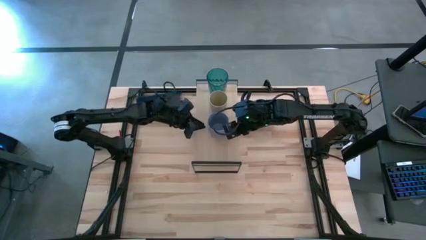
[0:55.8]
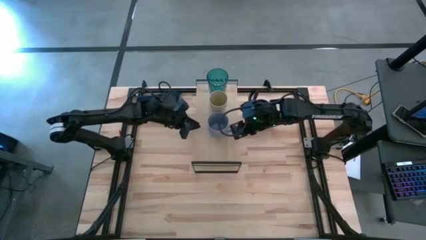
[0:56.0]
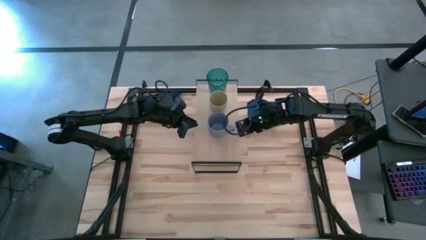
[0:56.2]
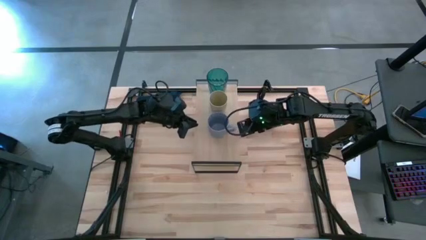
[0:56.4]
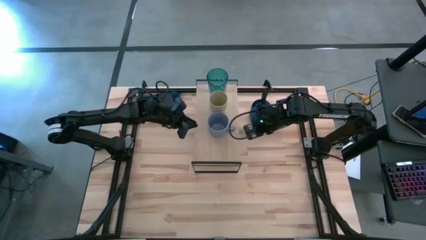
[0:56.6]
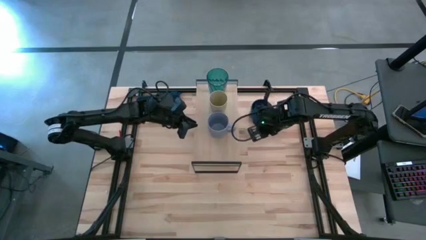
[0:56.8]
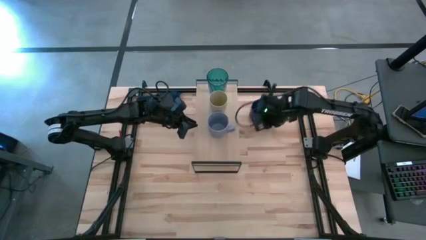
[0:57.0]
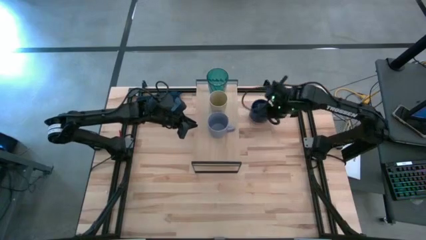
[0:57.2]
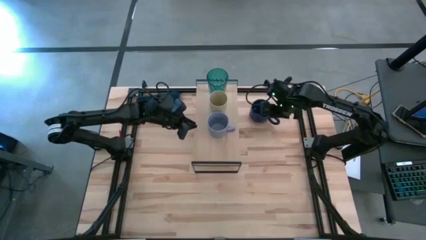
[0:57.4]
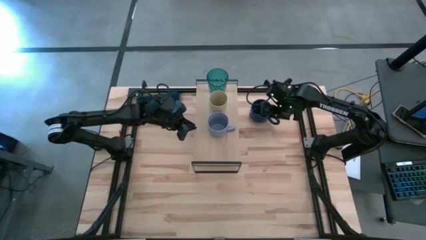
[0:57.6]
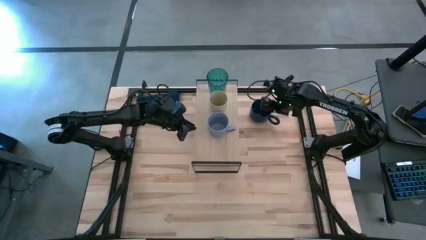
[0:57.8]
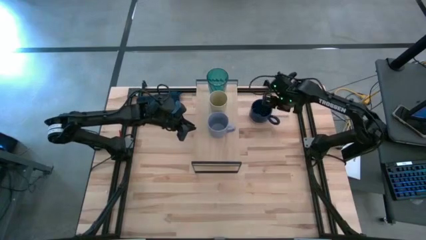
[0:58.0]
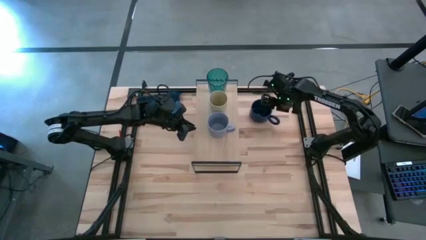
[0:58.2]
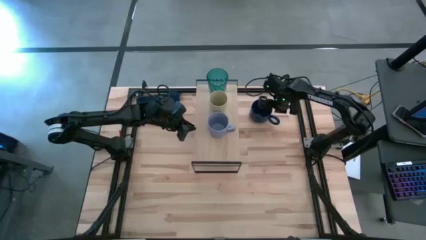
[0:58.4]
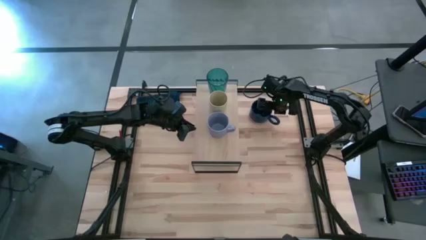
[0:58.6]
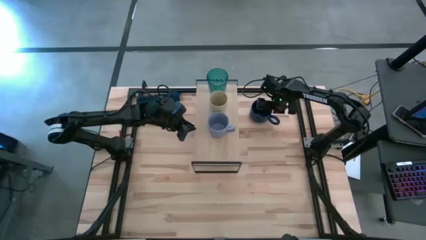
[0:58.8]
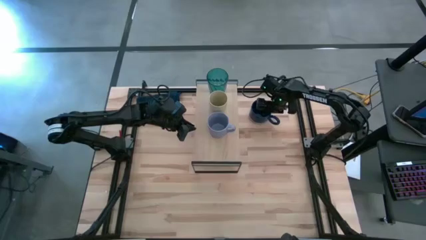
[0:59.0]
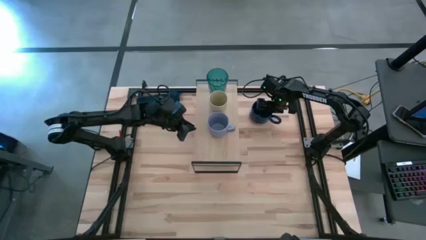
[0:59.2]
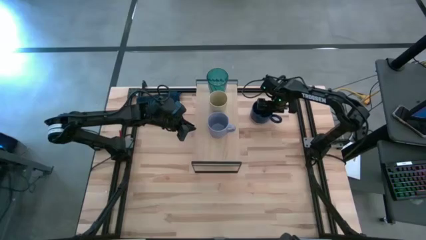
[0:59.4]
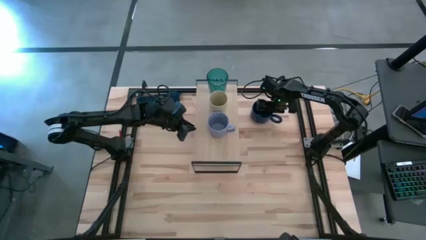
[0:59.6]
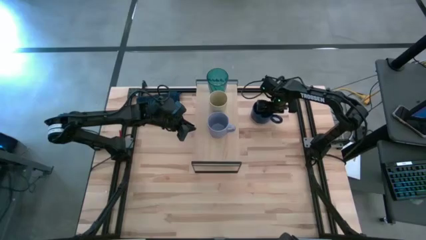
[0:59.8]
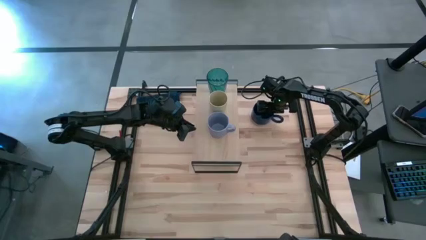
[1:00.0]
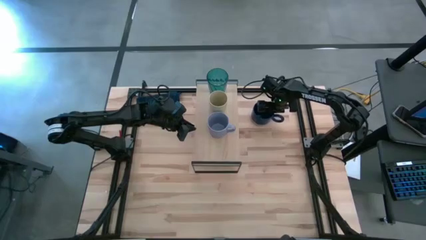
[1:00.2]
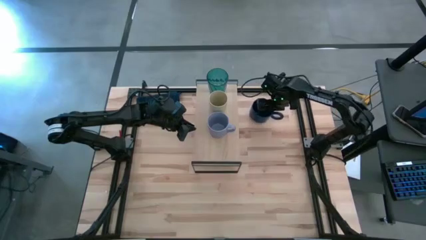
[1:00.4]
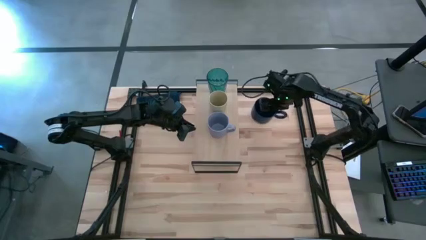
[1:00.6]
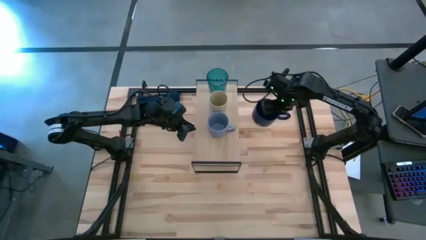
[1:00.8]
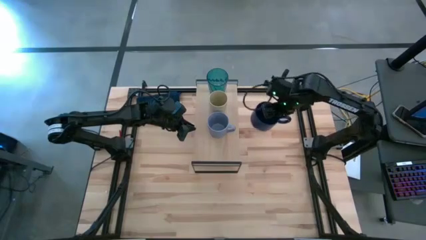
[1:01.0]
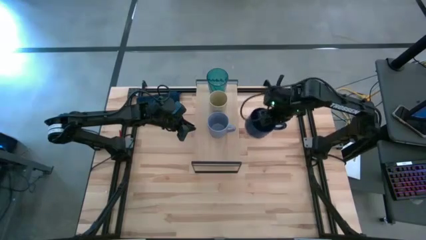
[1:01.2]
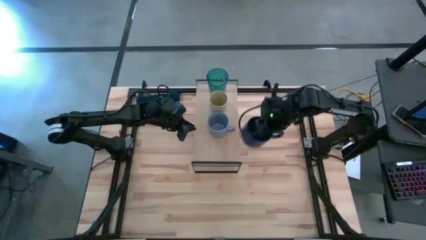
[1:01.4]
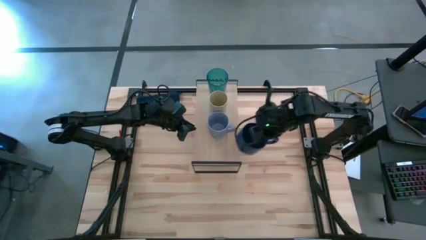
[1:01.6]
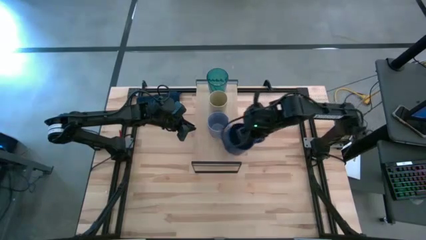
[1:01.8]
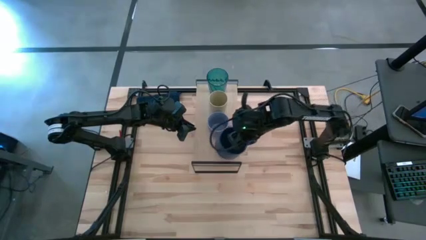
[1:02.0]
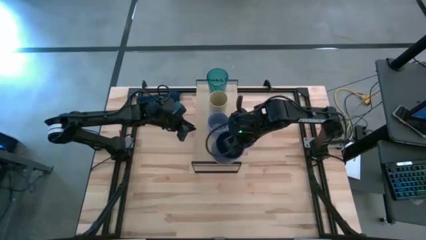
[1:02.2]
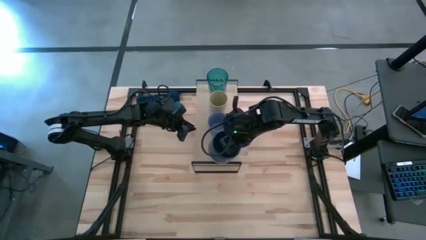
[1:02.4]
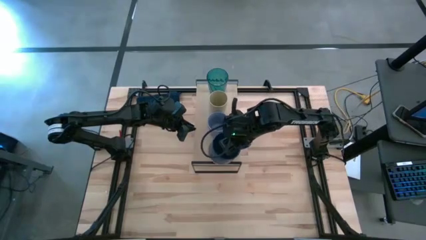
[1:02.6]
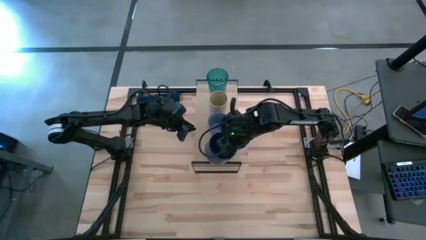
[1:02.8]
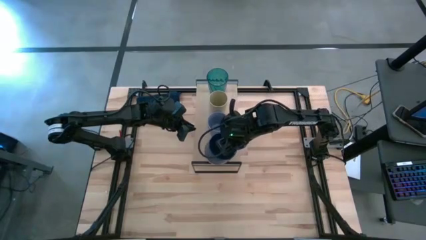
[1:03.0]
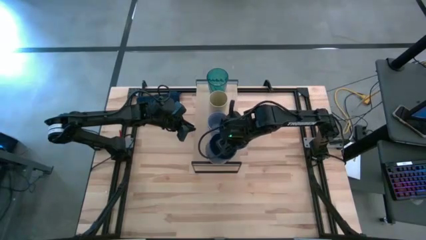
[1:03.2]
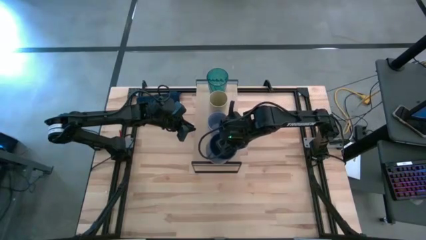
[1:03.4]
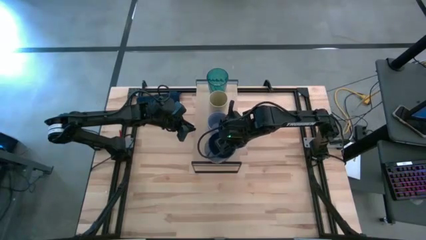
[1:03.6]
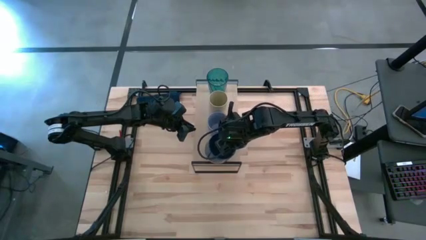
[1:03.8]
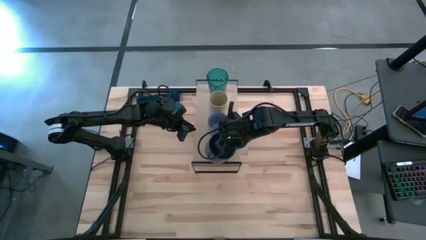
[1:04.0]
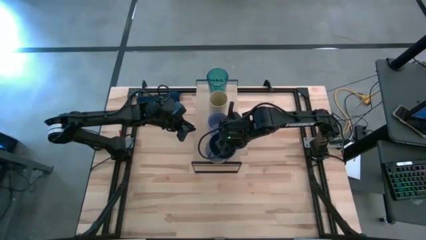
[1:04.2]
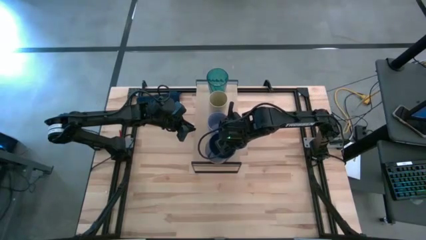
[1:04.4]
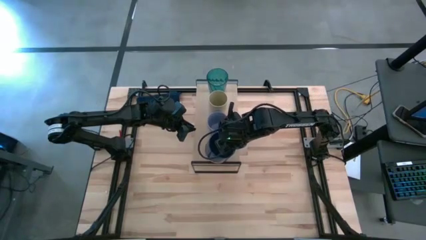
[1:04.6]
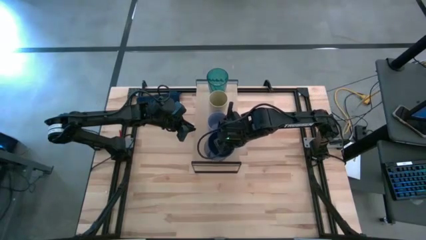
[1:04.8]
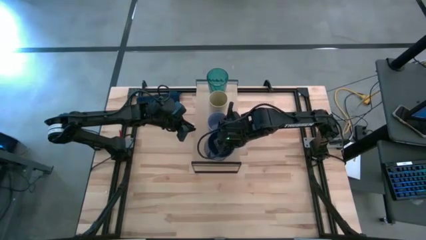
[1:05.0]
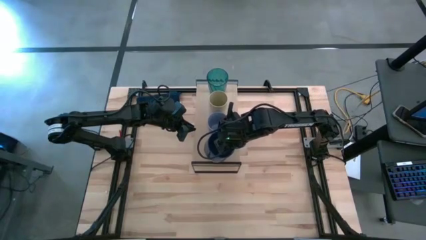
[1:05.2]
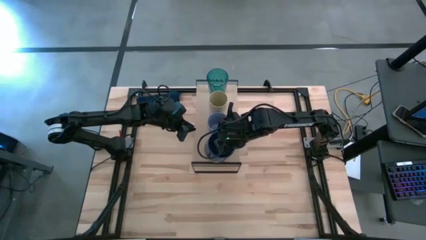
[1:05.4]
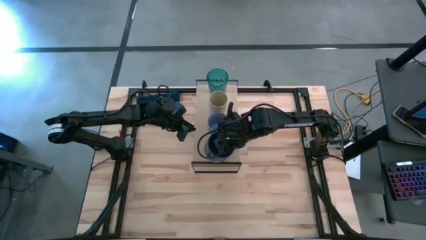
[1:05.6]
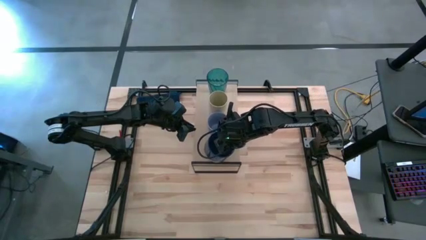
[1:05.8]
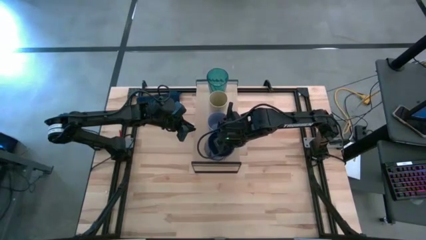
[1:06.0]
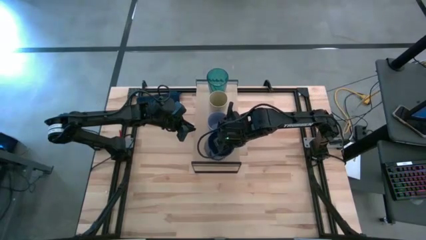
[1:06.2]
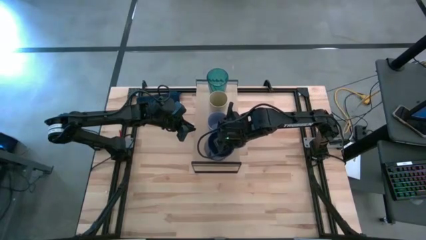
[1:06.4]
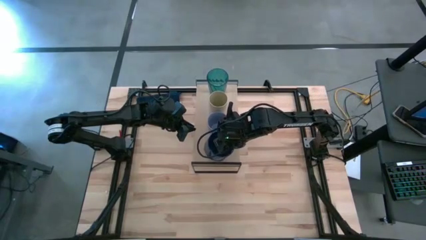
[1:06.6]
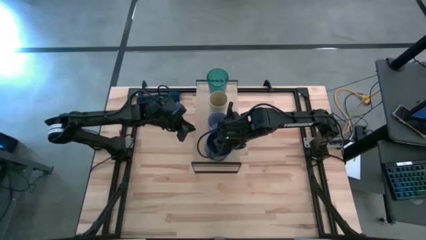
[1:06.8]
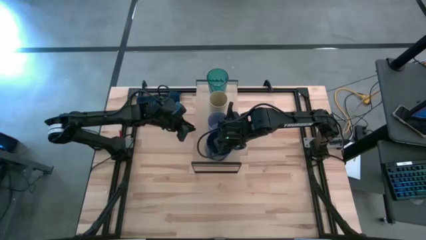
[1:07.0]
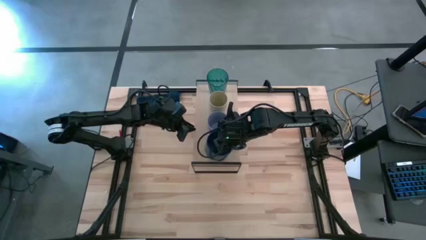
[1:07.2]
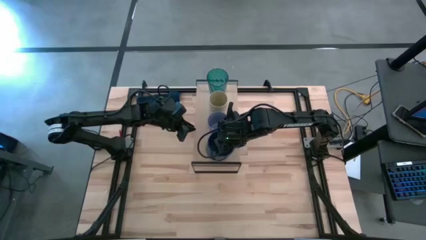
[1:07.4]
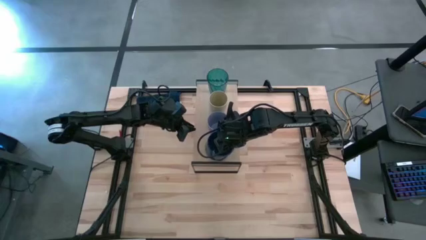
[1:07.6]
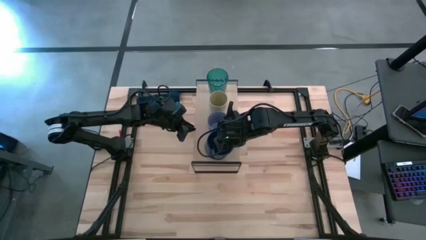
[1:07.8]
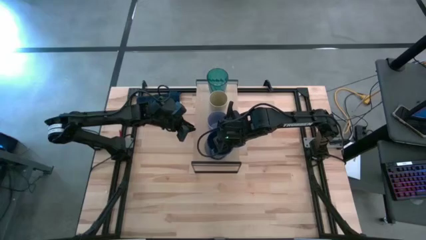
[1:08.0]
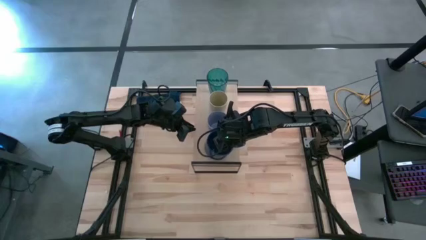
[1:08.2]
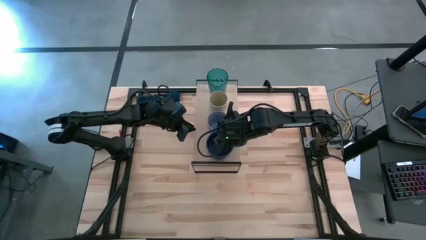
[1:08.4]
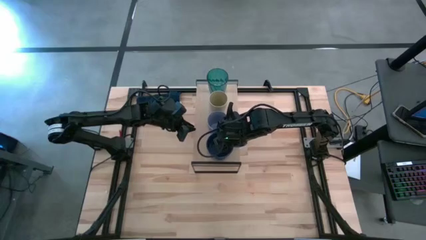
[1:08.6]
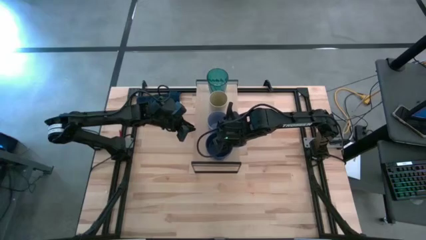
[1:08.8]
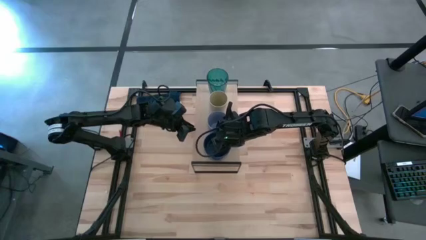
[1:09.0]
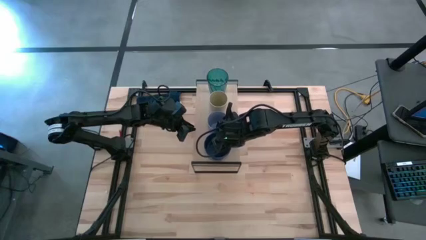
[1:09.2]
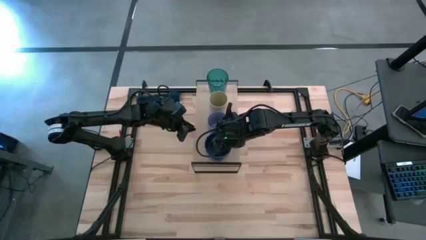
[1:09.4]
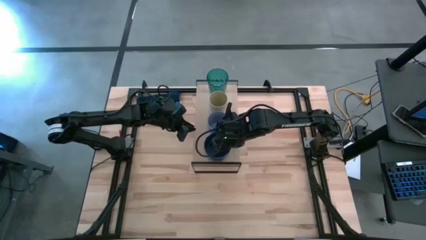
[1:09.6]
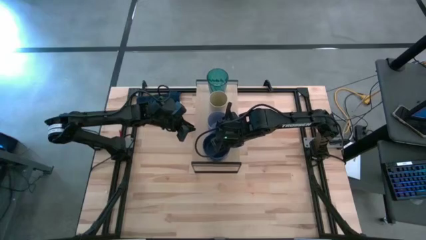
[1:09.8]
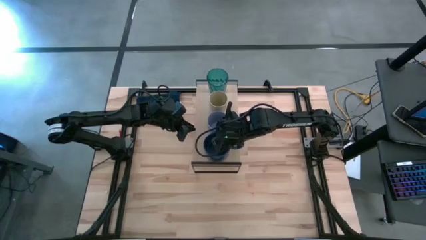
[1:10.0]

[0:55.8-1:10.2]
Task: Stack small to large cups/mugs on shelf
Put the dark blue mug on the shelf

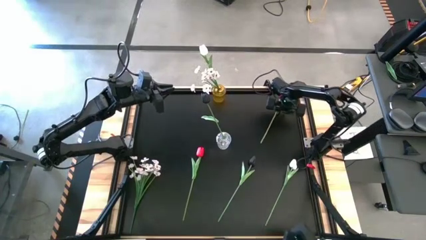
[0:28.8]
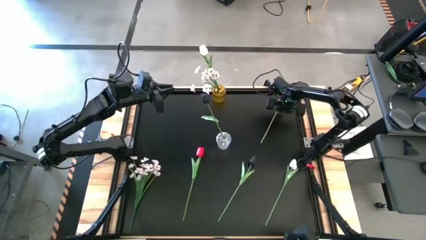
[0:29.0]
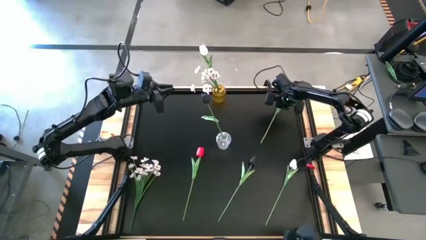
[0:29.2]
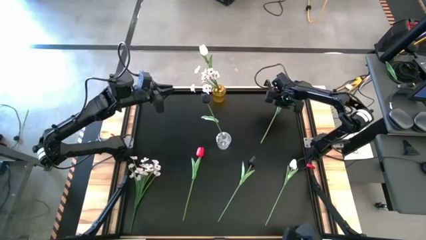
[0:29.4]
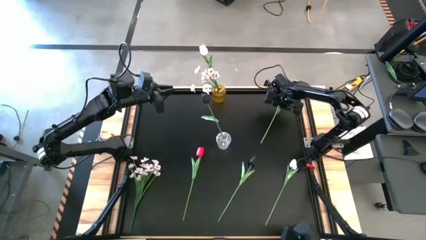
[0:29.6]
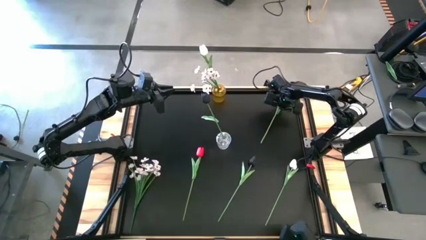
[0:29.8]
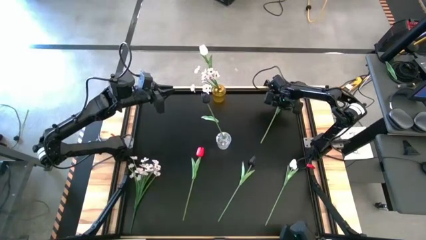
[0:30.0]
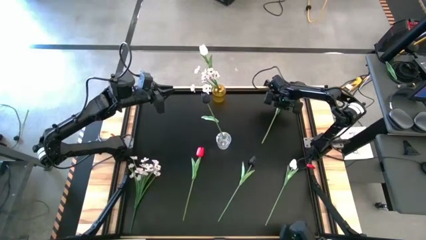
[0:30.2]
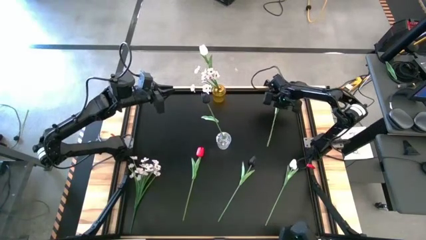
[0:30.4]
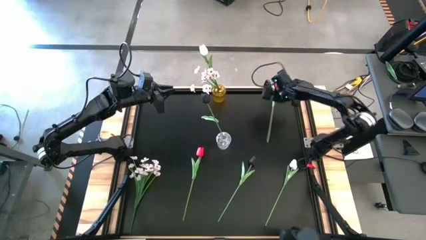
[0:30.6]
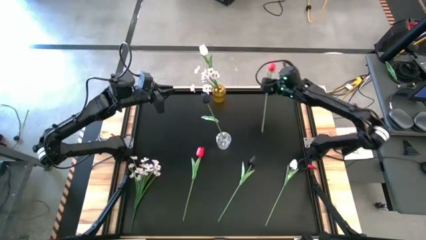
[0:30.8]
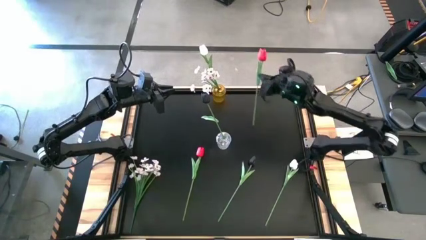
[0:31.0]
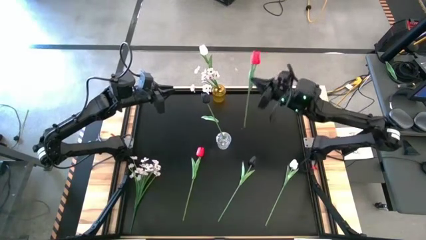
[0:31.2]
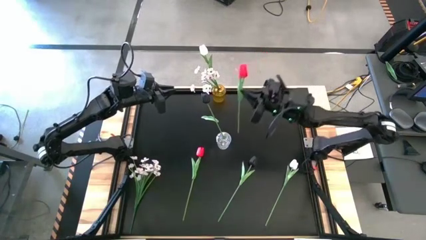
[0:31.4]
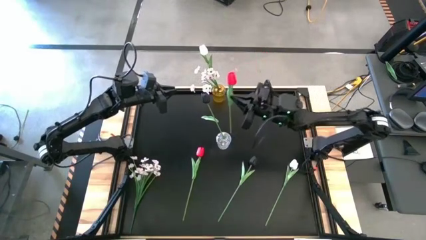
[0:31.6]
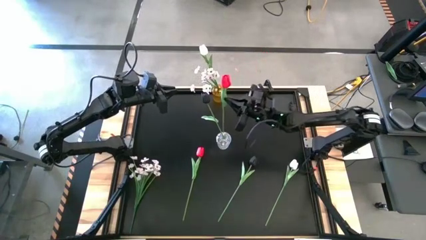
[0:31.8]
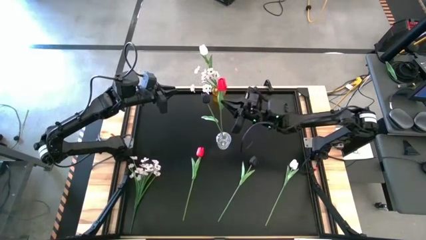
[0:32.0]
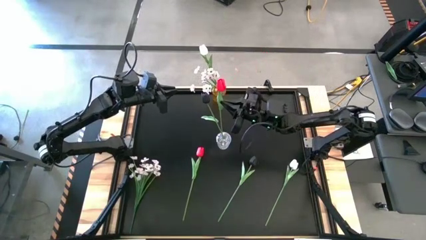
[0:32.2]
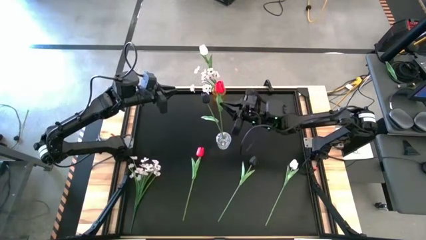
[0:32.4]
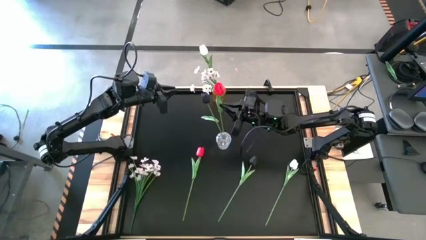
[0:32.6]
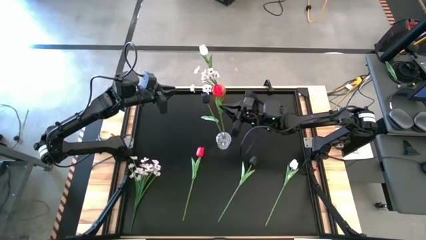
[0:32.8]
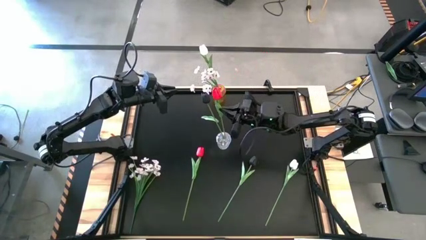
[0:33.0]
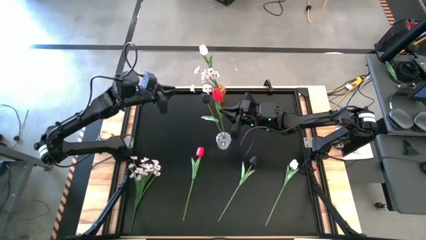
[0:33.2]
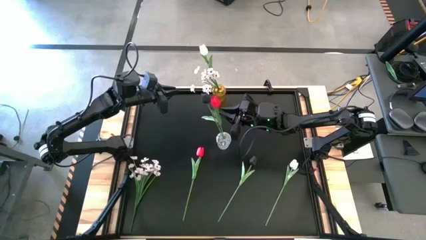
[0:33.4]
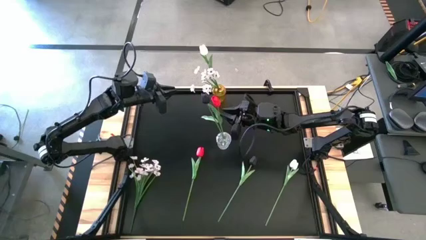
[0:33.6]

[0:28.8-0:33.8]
Task: Sort flowers into vase by color
Put the top red tulip into the transparent vase
